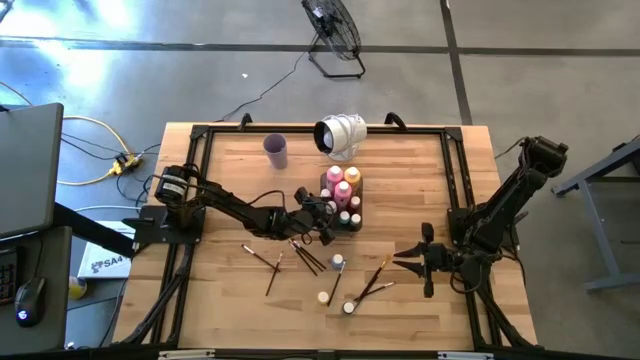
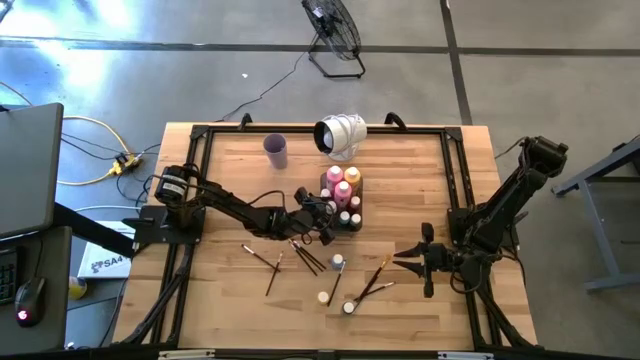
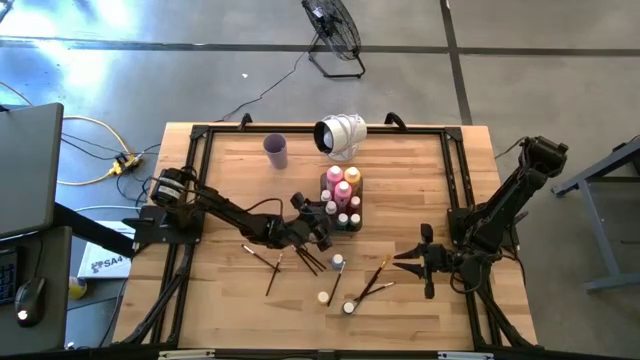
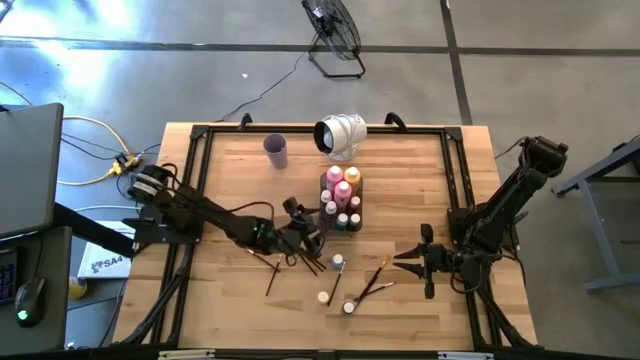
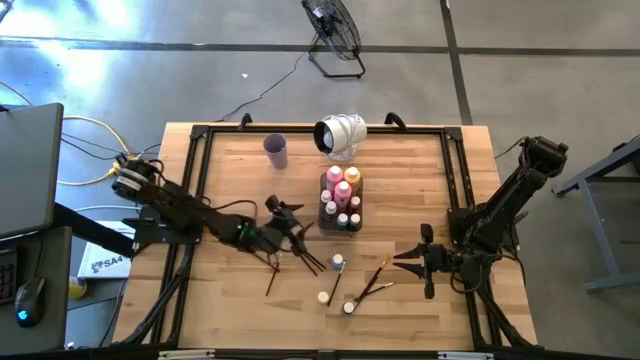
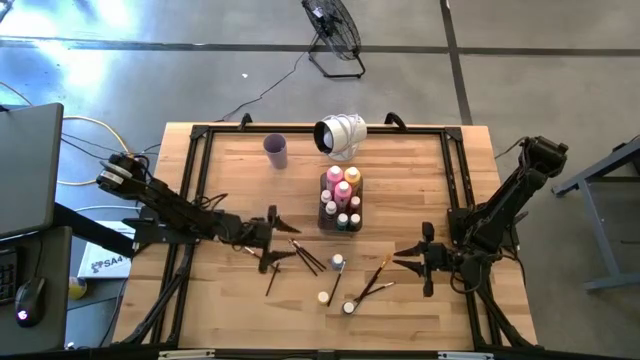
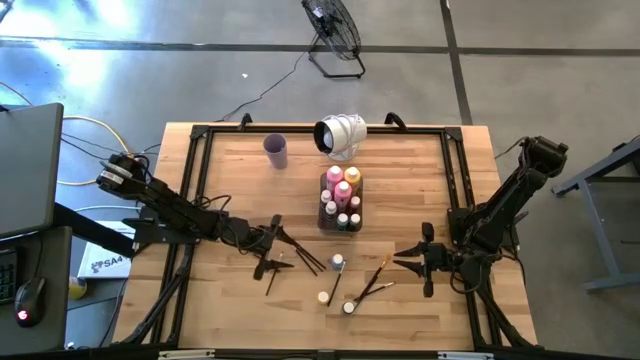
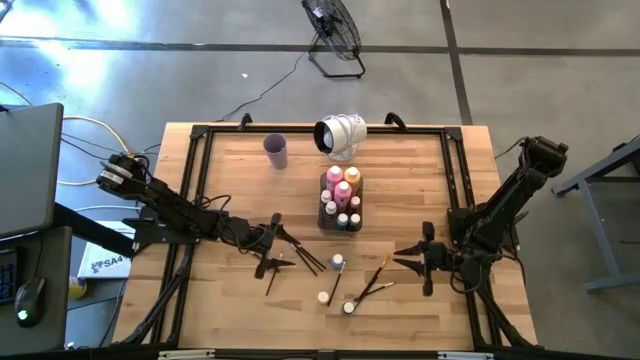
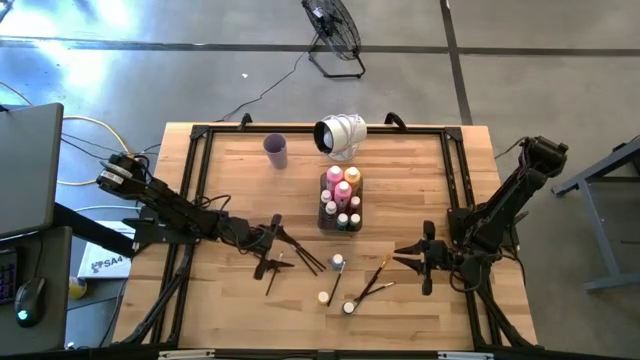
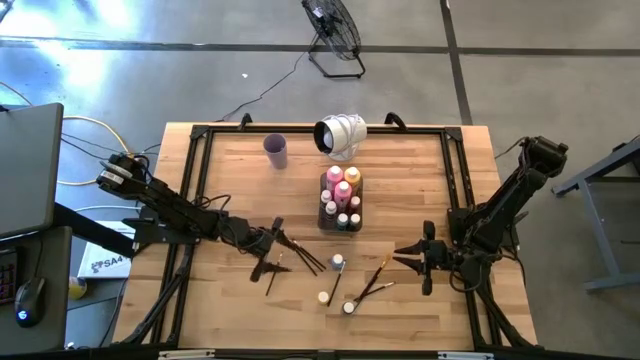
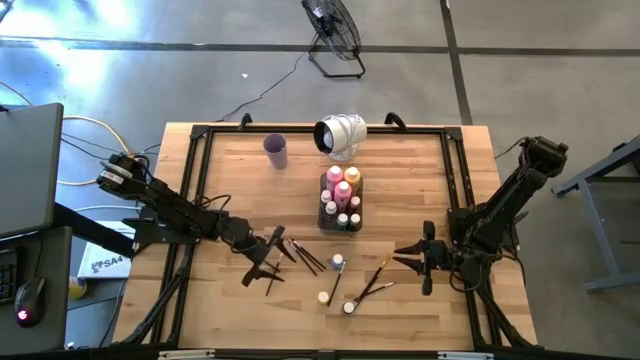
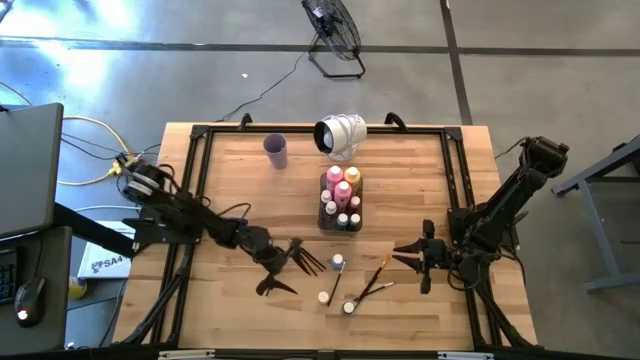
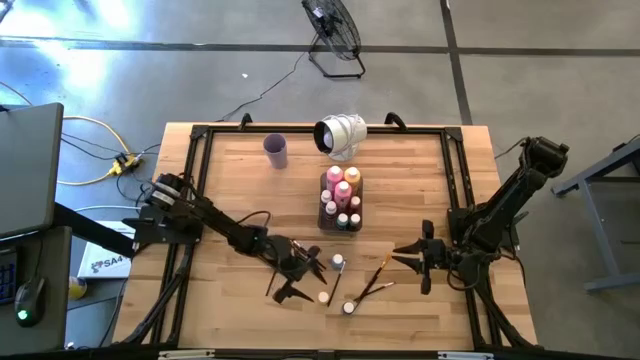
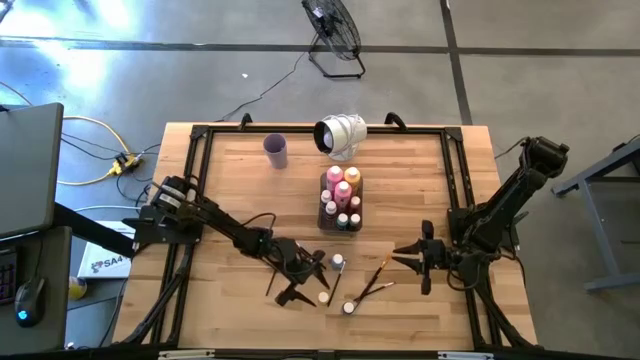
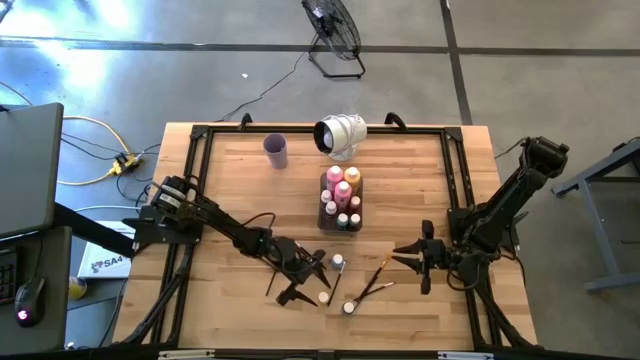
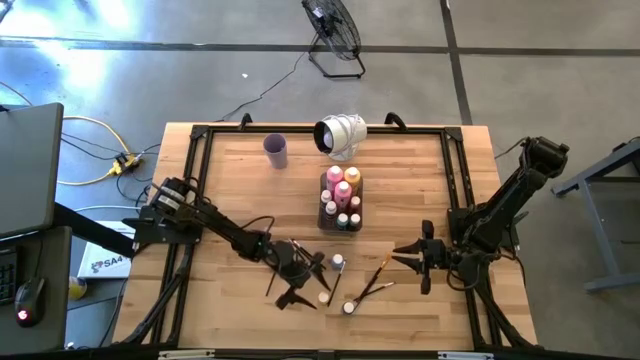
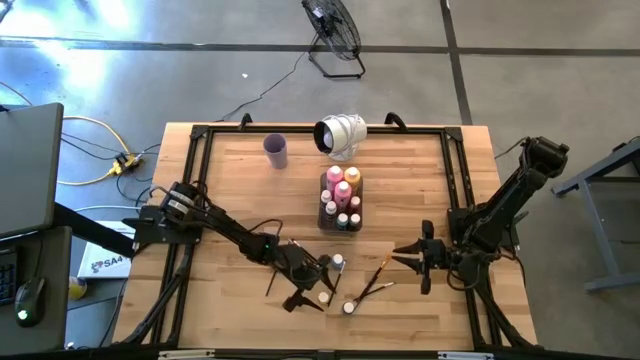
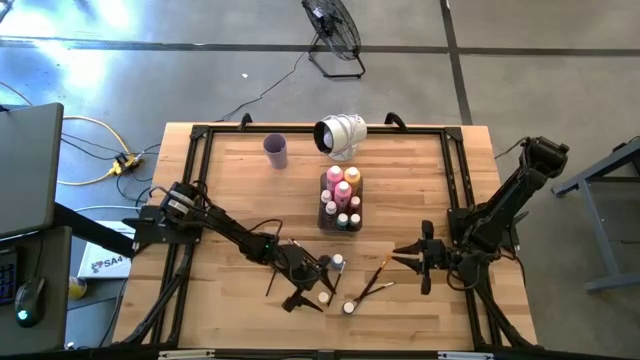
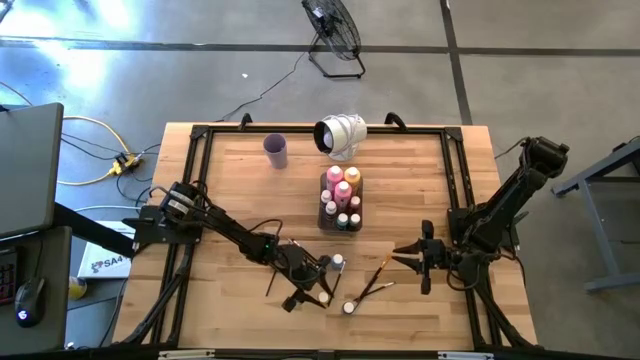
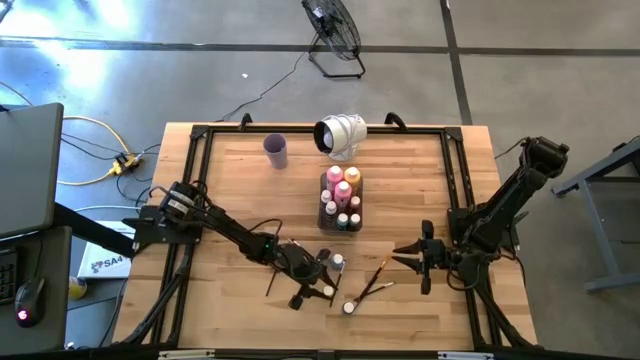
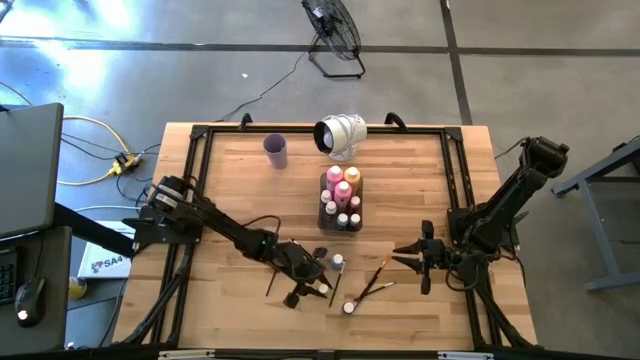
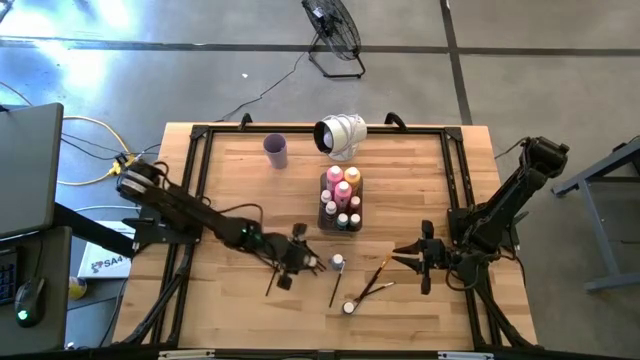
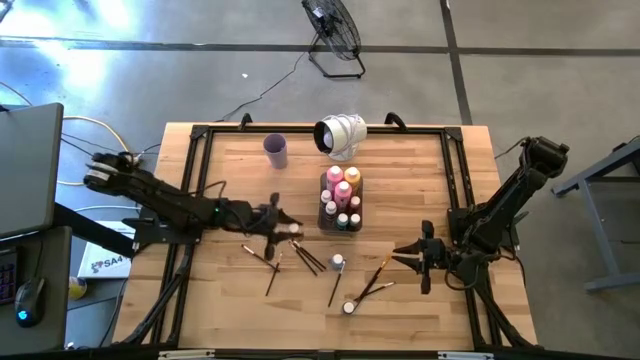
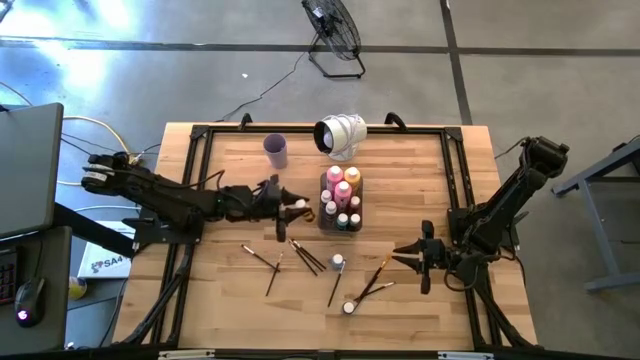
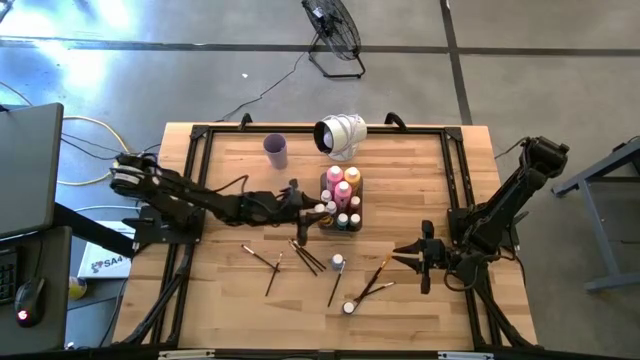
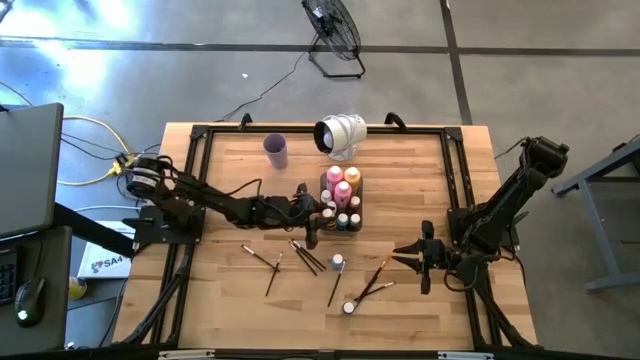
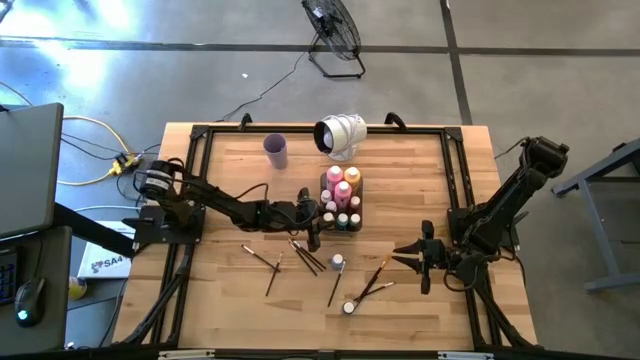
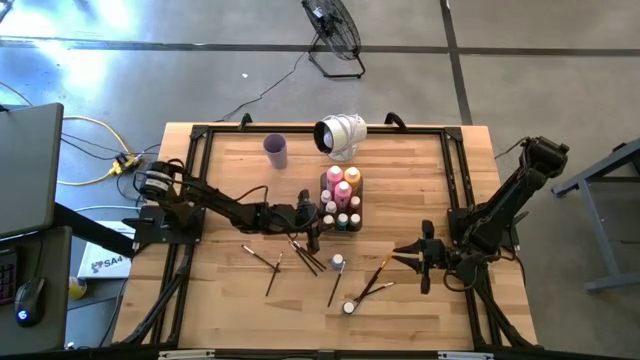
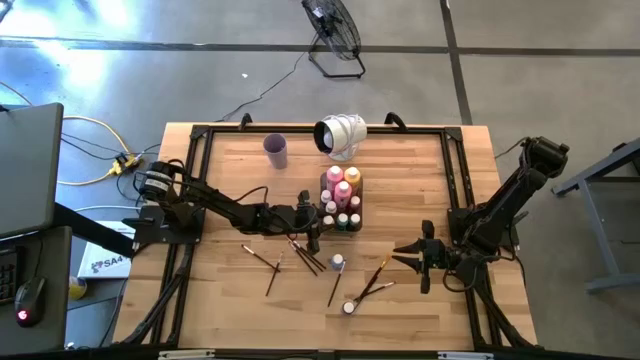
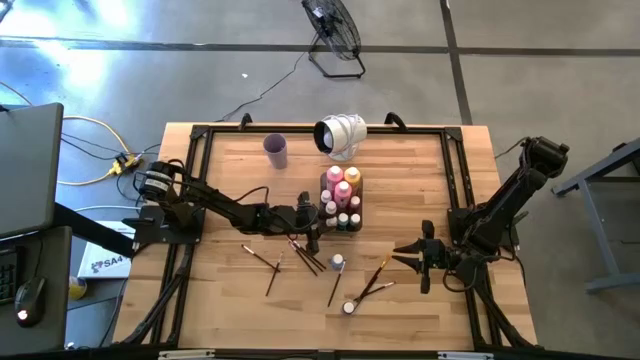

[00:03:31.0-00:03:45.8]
Task: Pick & Place Paint Supplies
Put the yellow paint bottle into the black bin

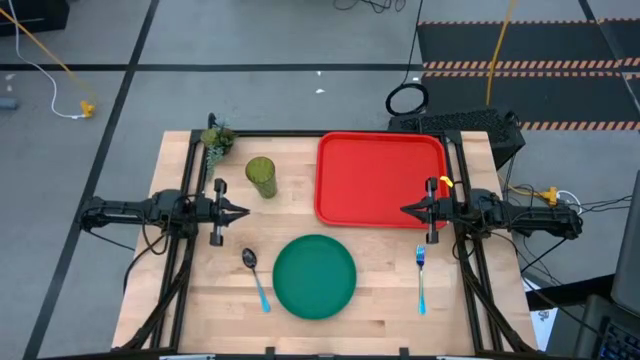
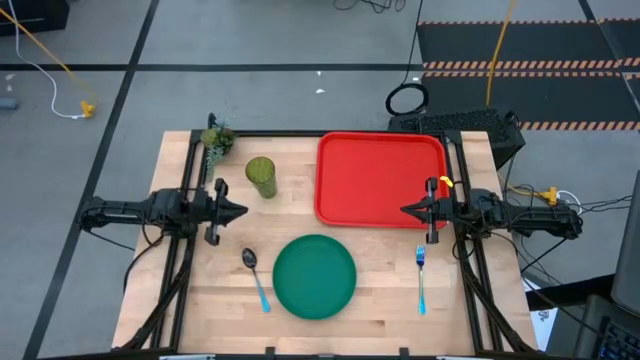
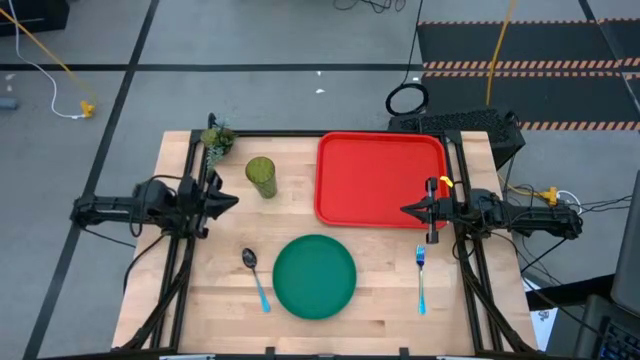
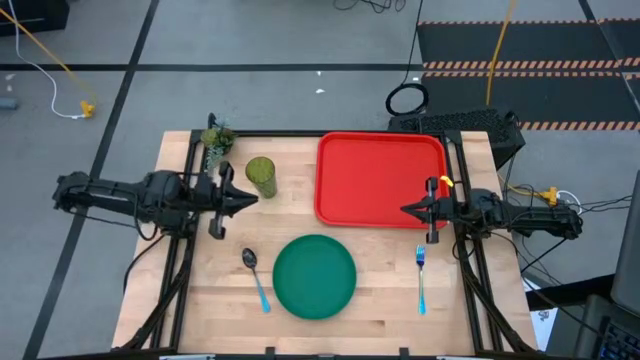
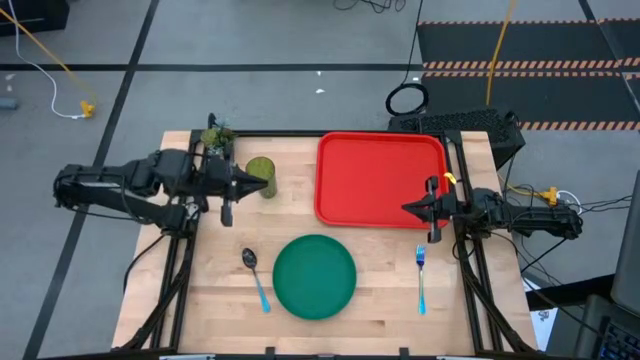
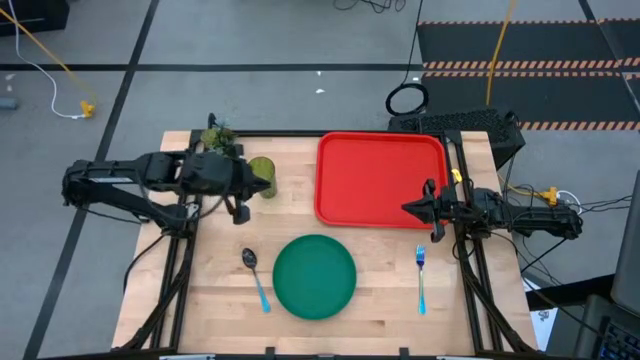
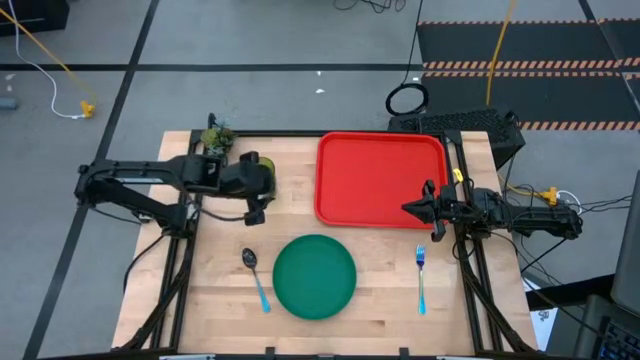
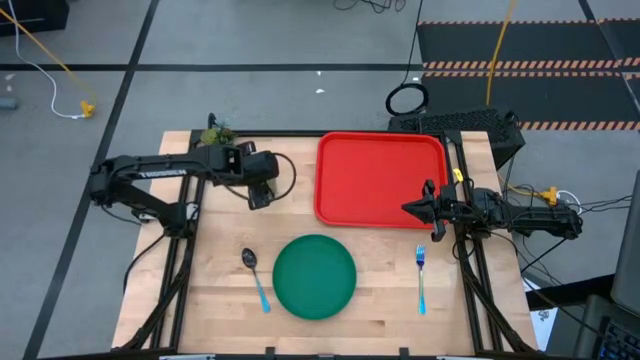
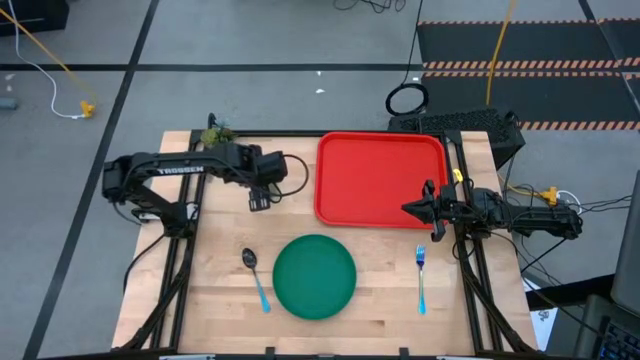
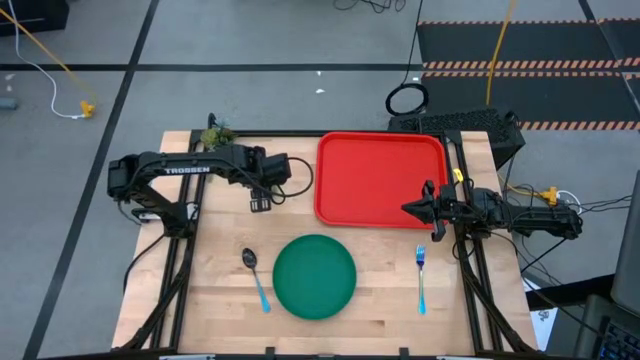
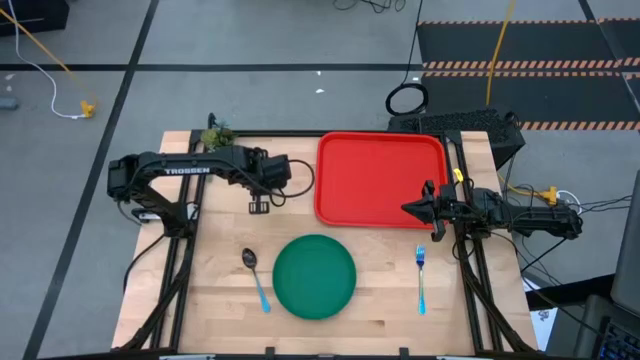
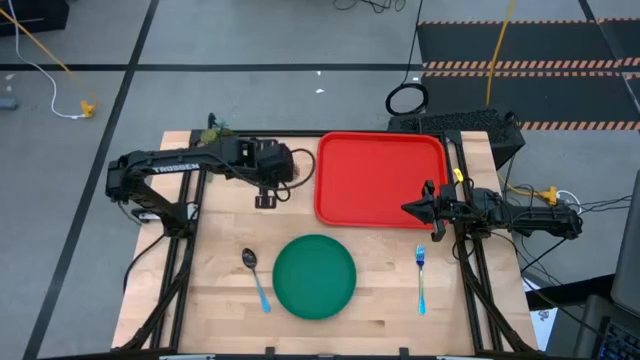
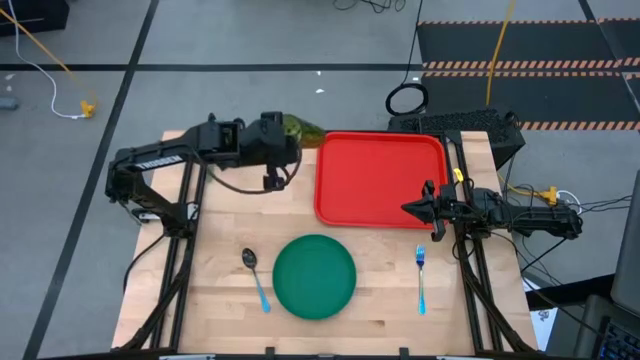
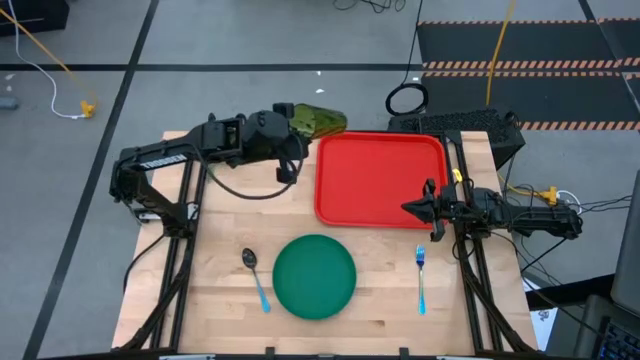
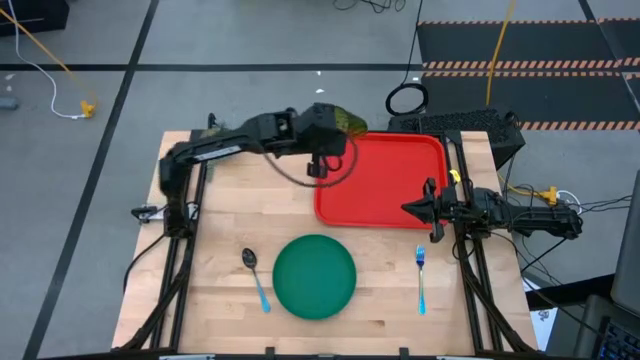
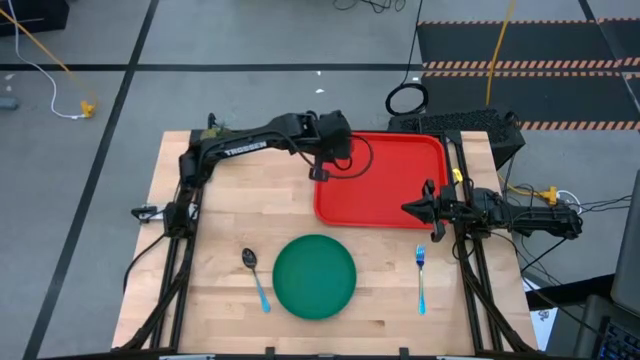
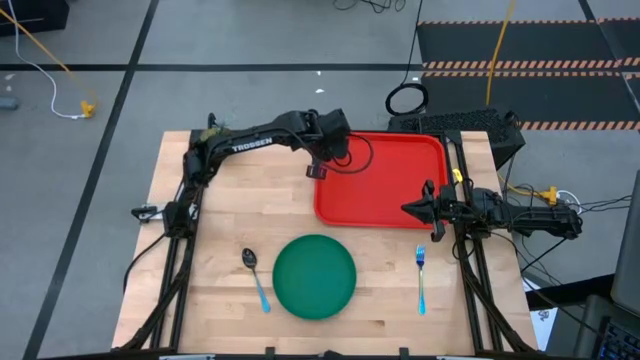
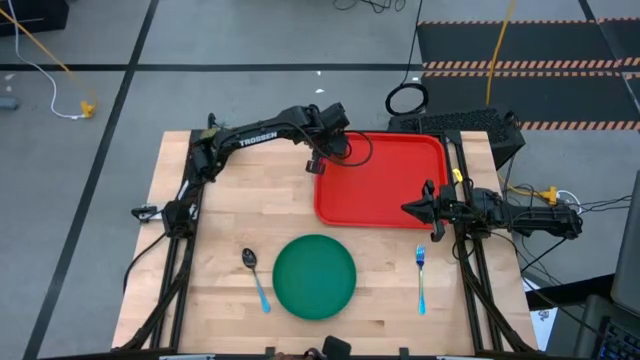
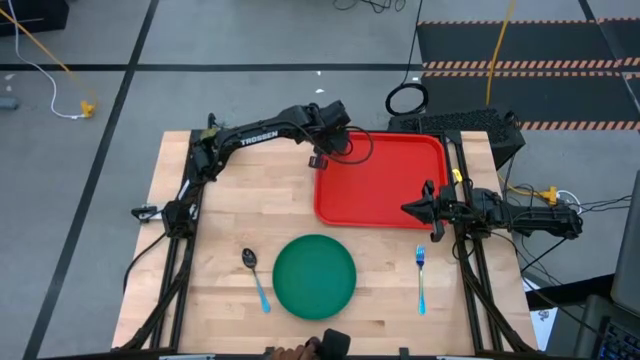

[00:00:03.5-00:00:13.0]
Task: Pick and place plate/cup/fork/spoon on tray
Put the green glass on the red tray
